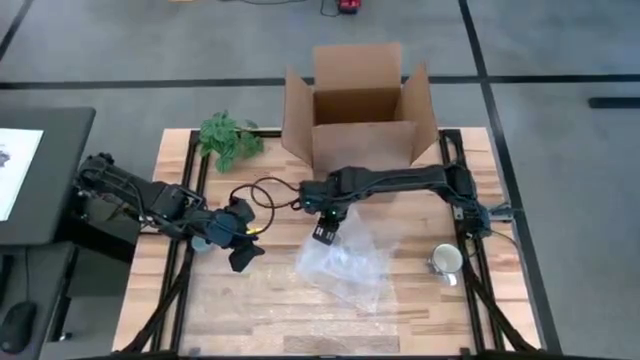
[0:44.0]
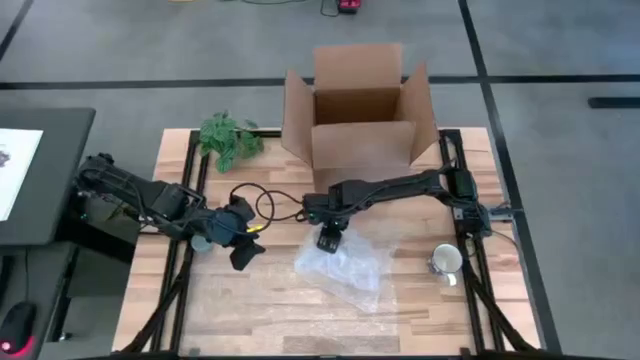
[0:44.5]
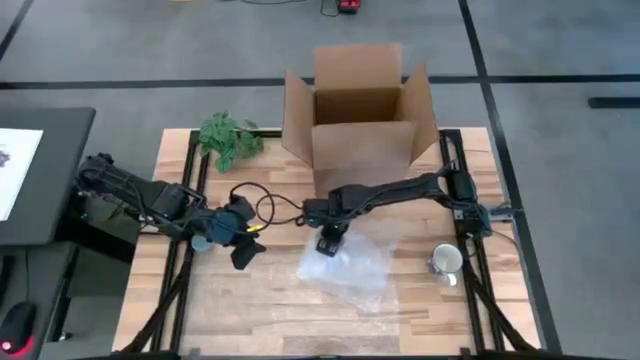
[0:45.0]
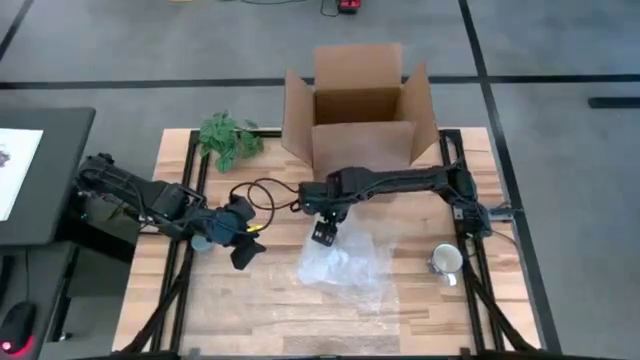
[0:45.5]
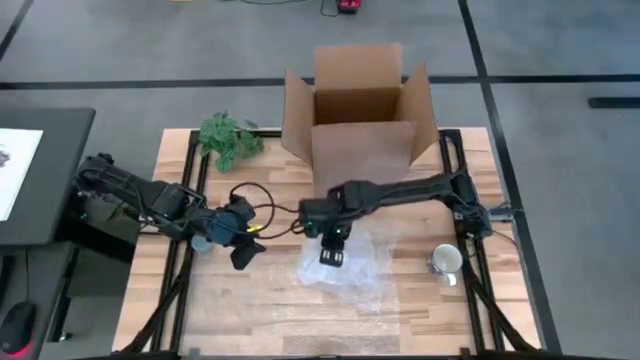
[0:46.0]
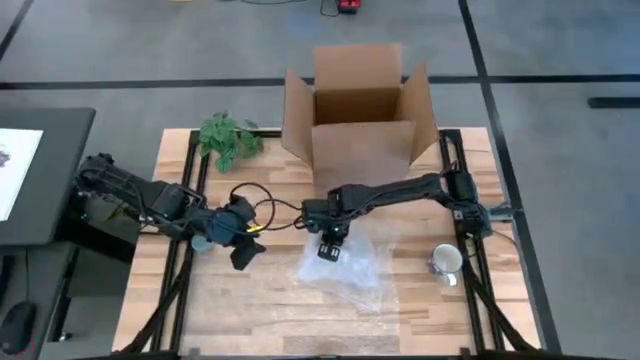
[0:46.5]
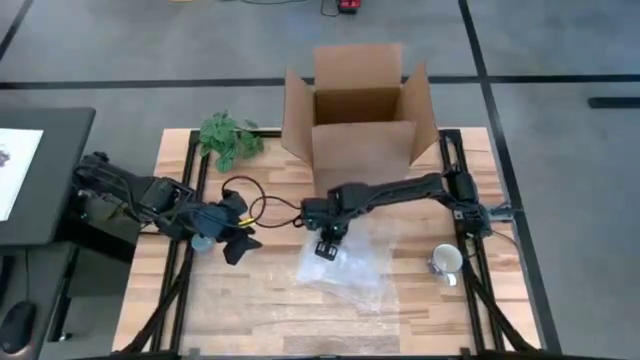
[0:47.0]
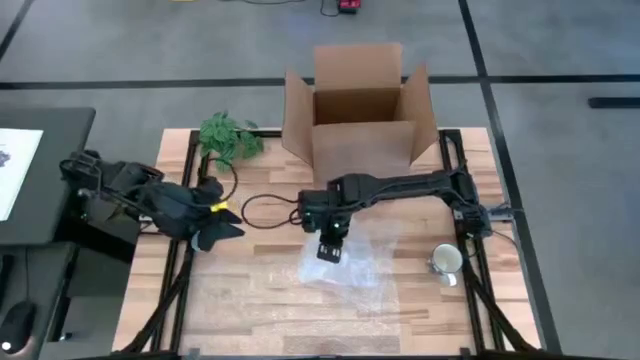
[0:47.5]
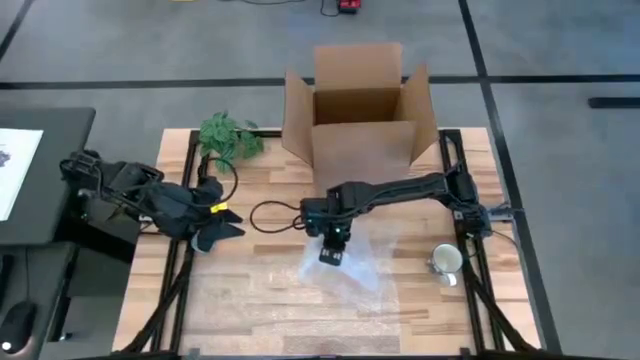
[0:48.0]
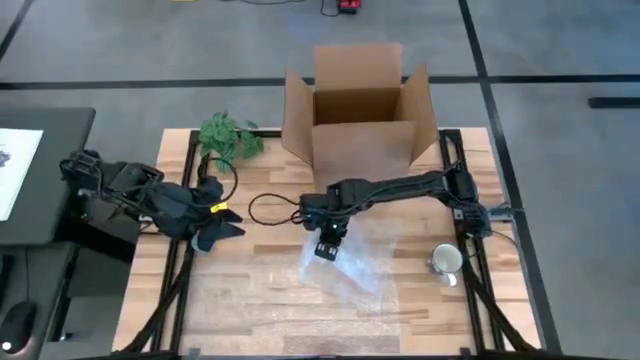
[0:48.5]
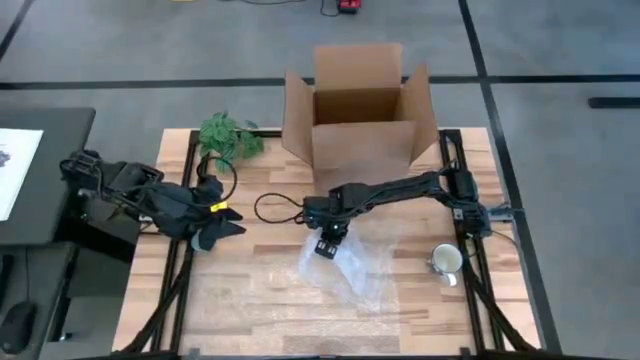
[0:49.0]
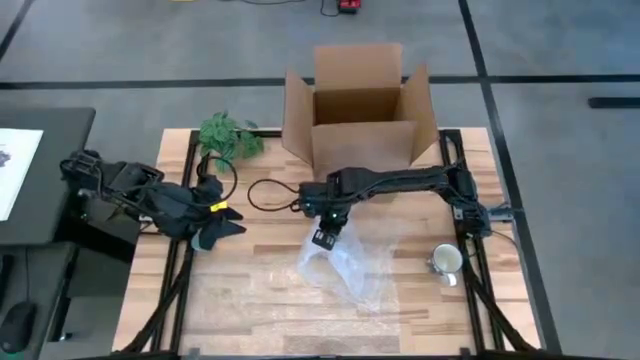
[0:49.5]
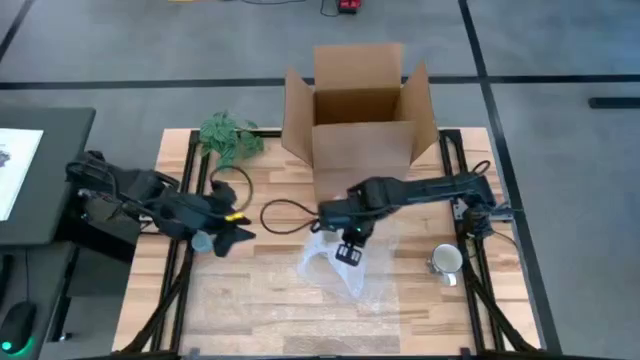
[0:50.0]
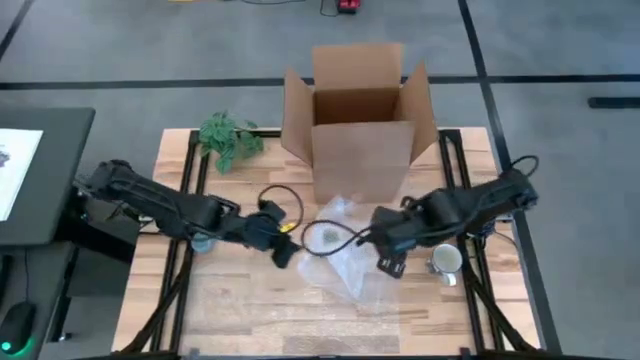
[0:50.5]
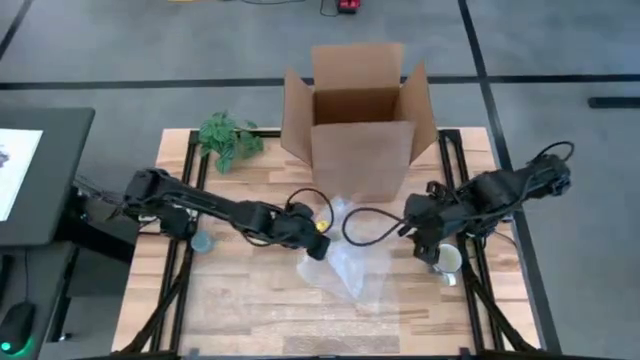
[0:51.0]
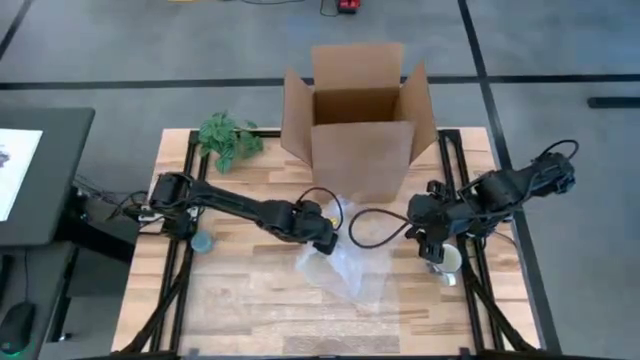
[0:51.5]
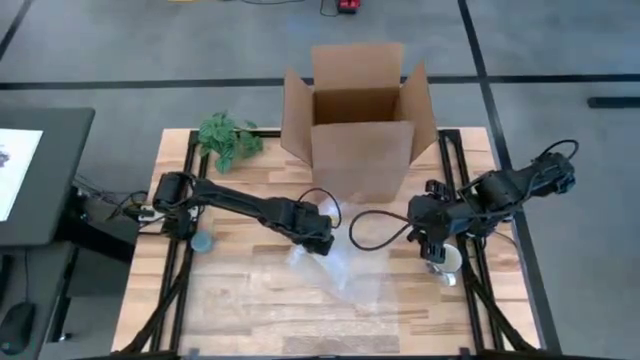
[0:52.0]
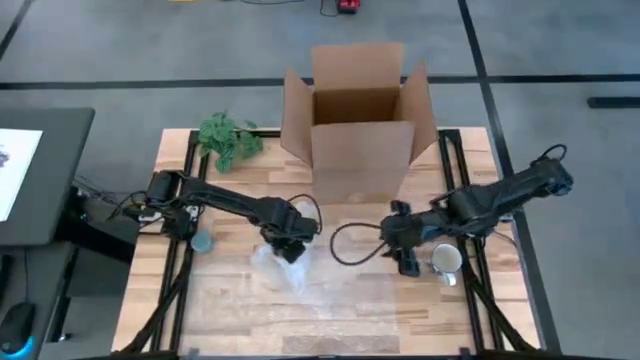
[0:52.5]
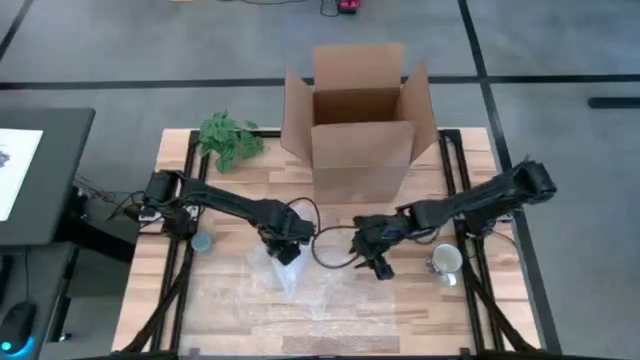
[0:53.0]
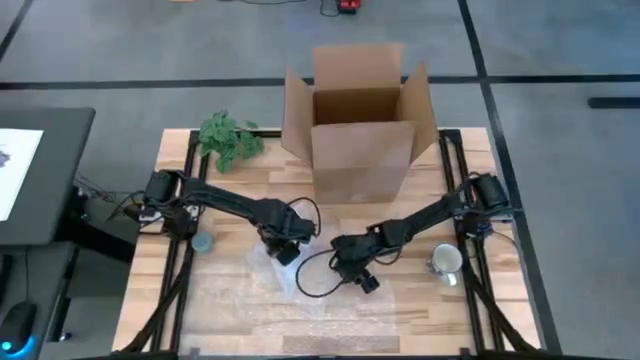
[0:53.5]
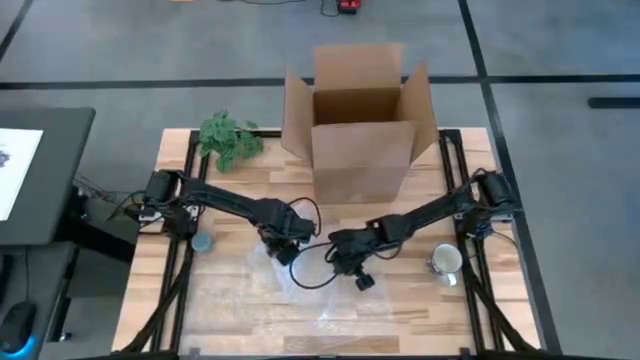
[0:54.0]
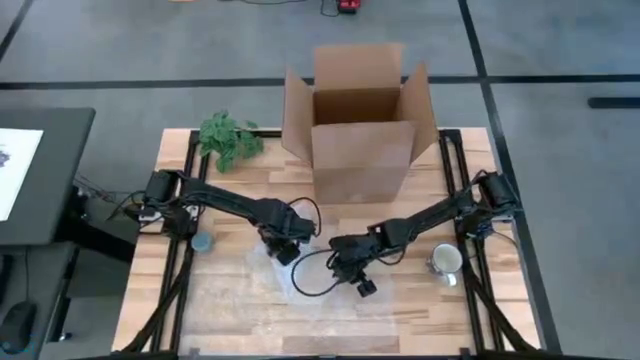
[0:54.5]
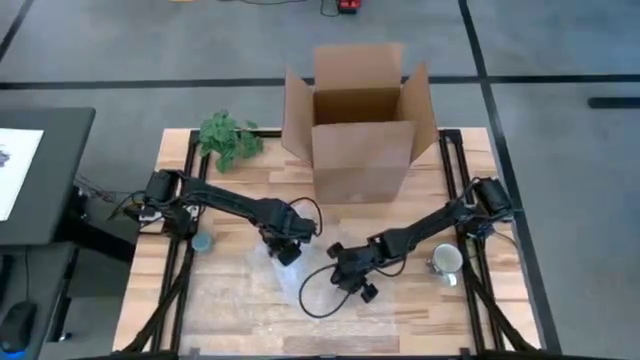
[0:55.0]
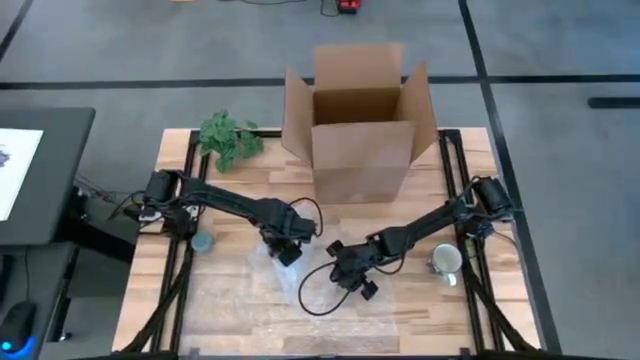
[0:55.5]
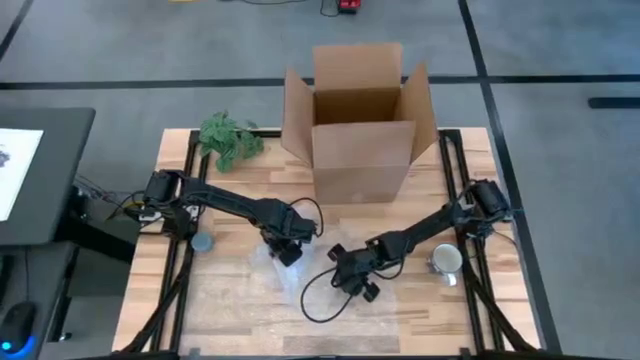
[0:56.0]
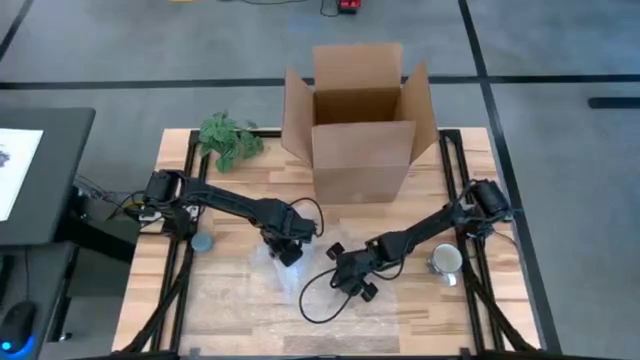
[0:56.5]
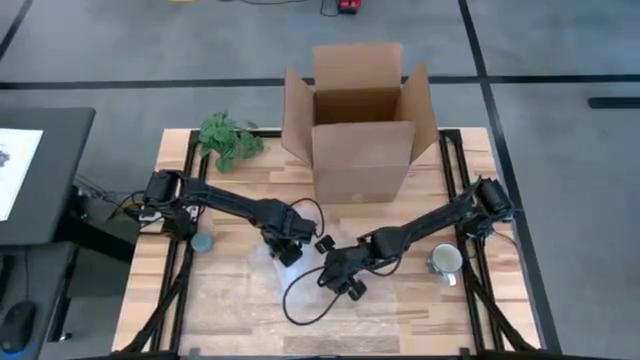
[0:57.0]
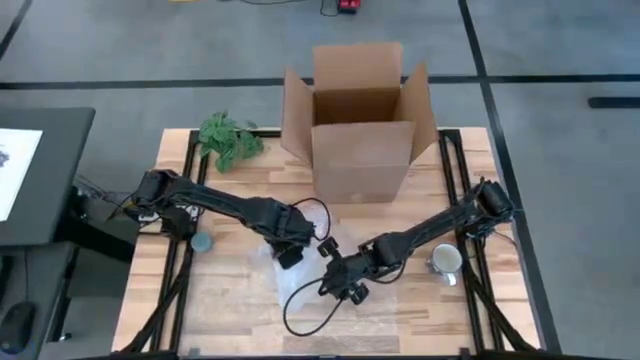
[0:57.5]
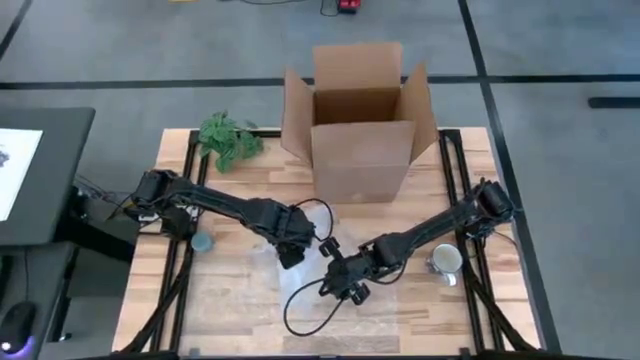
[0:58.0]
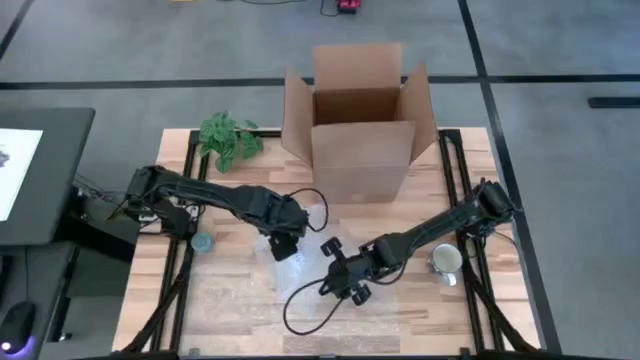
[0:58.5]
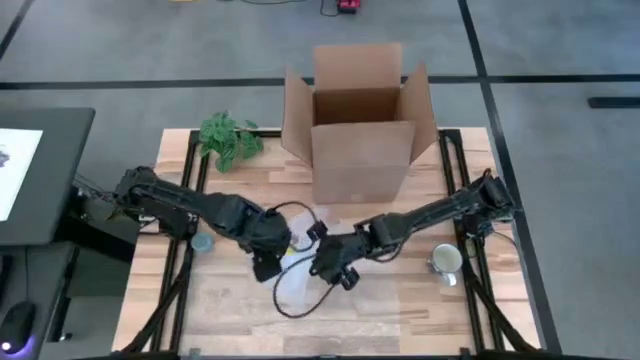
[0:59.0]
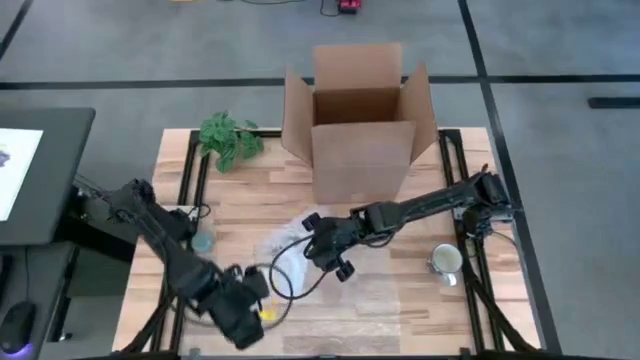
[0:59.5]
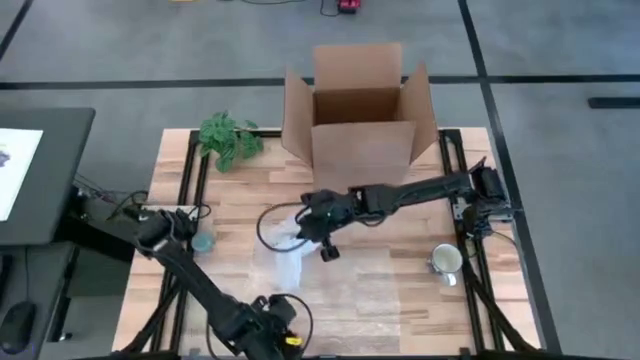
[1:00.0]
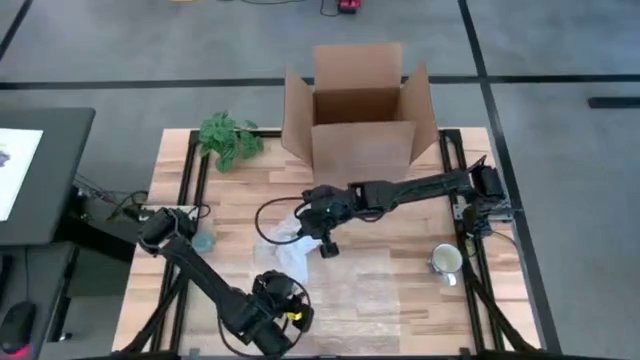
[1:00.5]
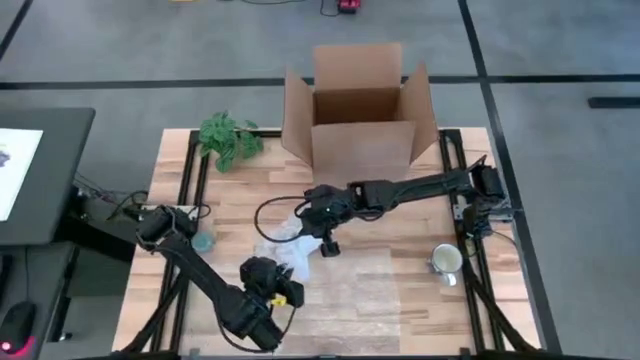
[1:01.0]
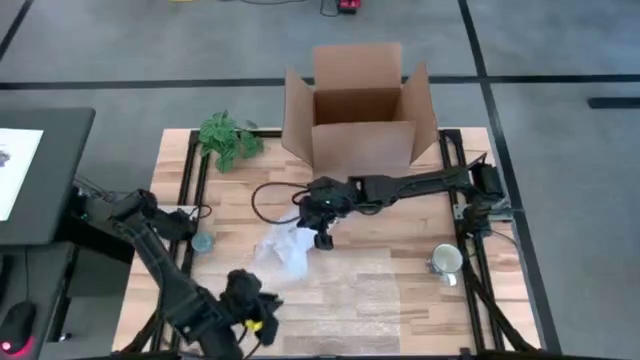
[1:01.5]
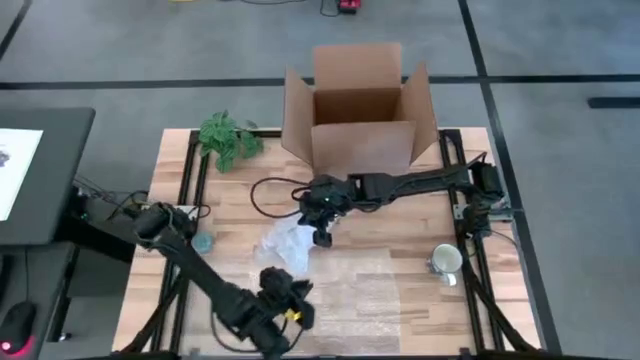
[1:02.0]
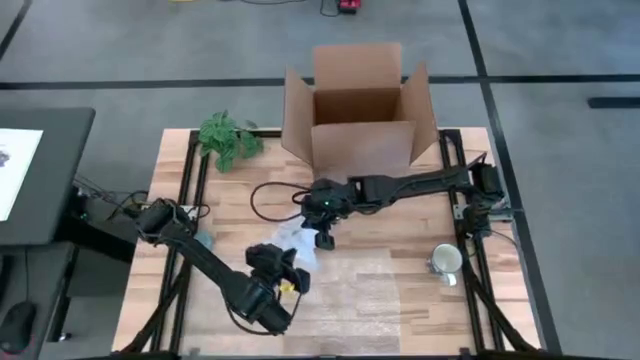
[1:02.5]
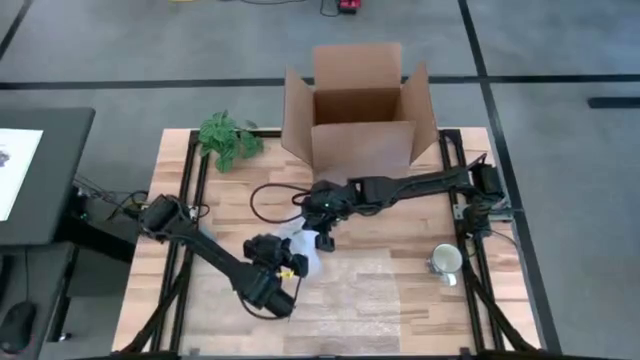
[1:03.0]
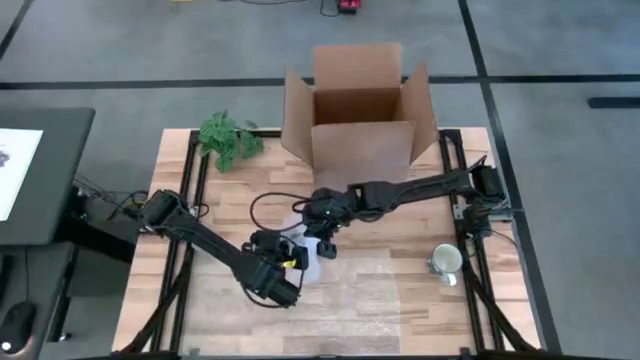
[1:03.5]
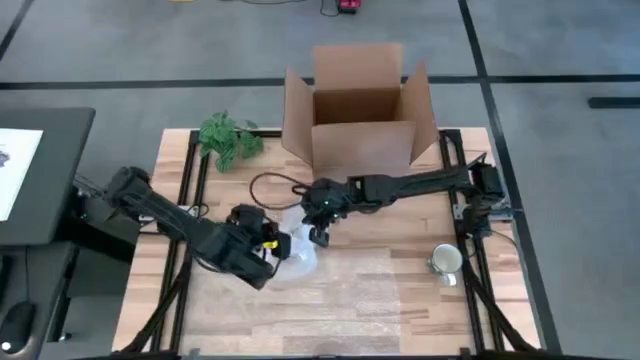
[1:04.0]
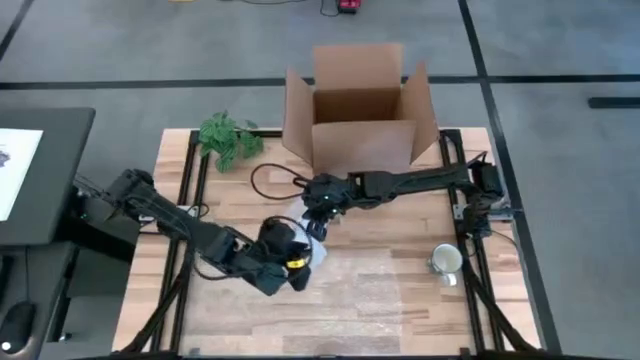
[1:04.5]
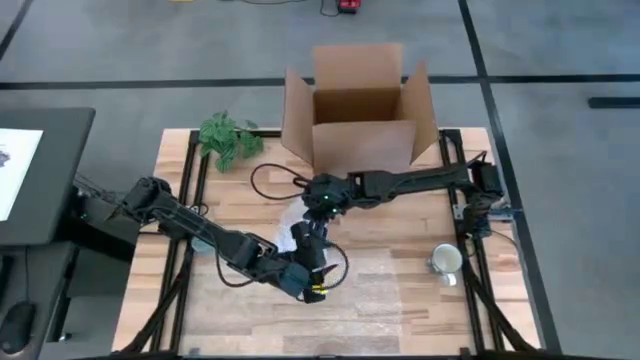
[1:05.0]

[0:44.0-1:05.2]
Task: wrap mug
Wrap the white mug with bubble wrap
